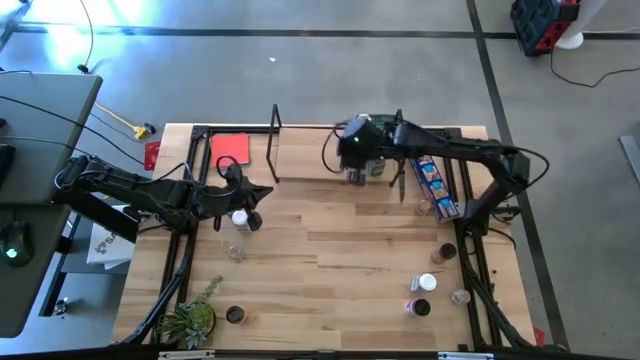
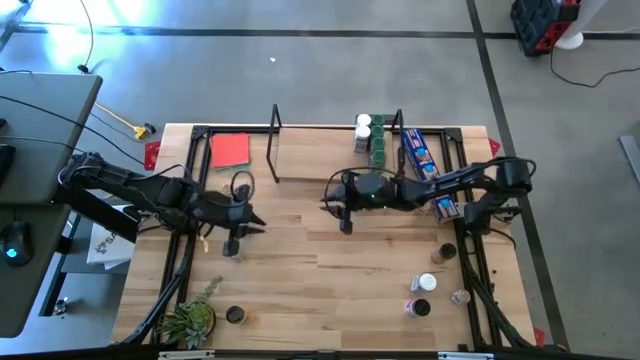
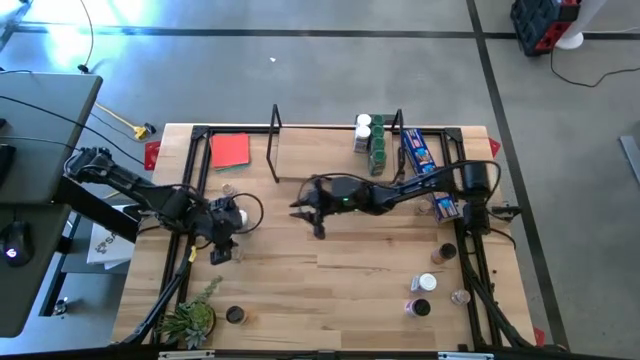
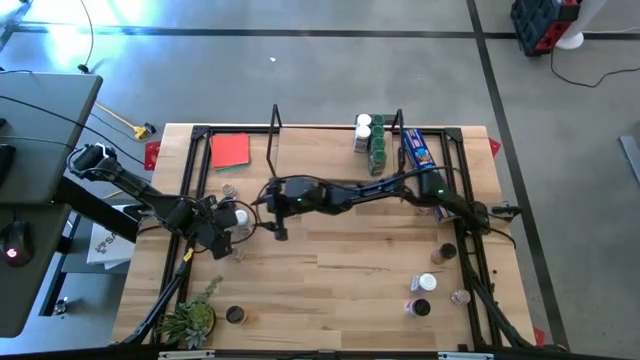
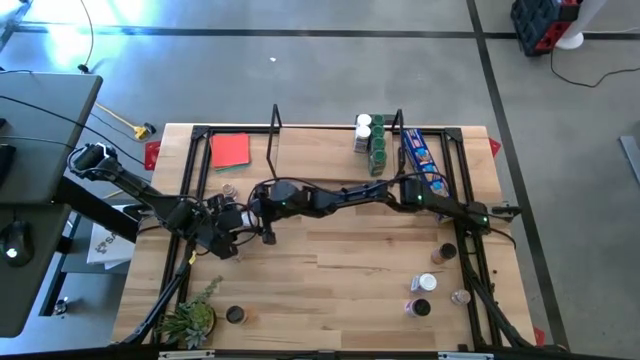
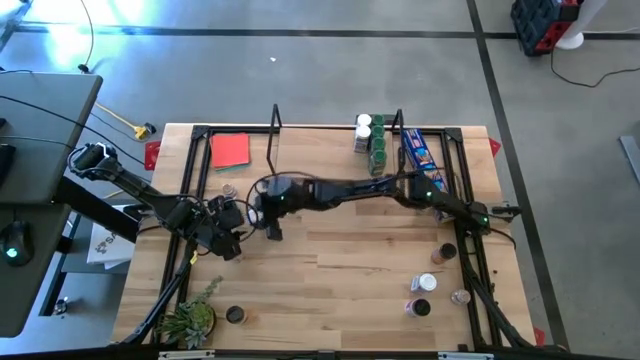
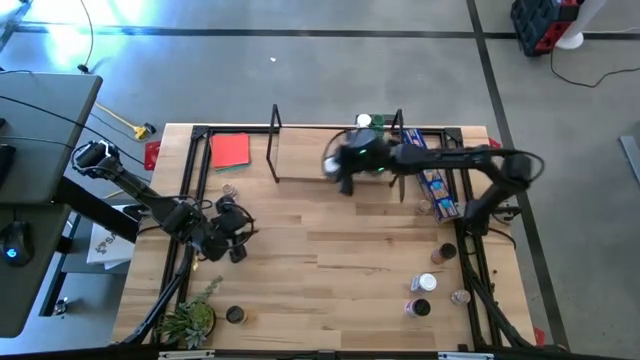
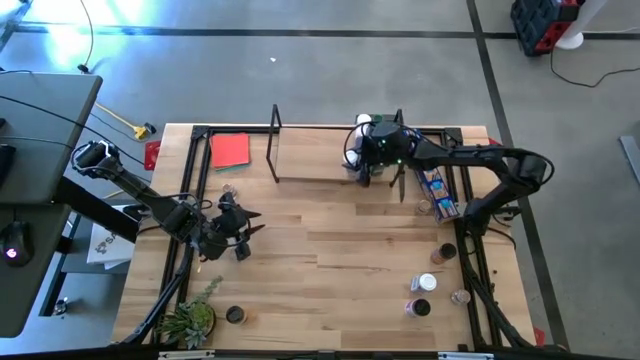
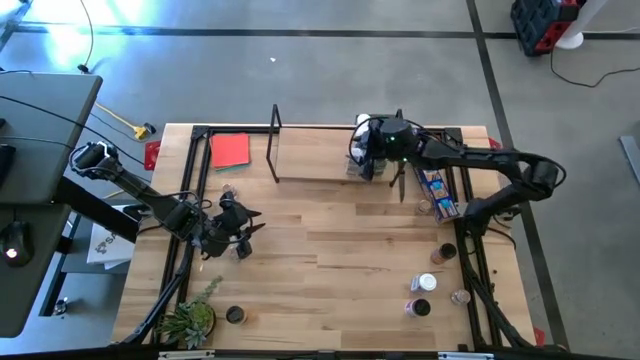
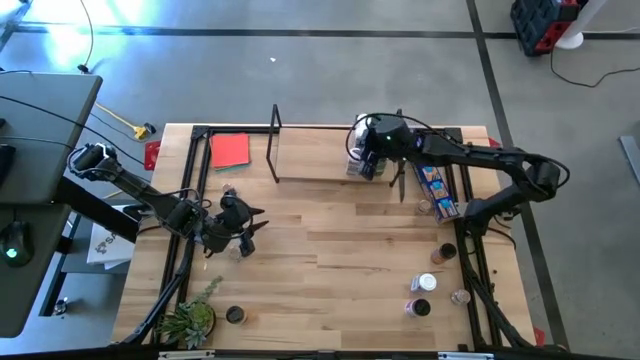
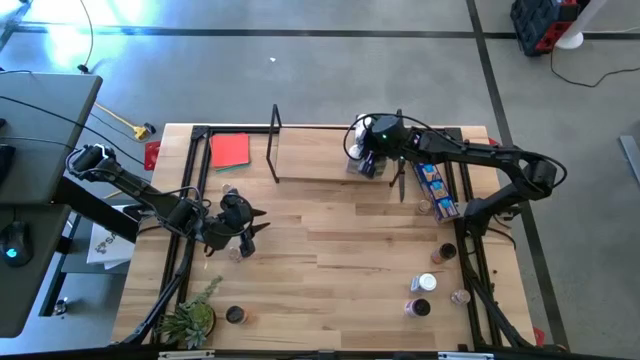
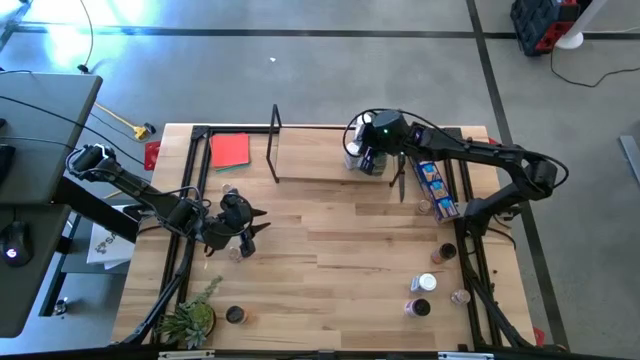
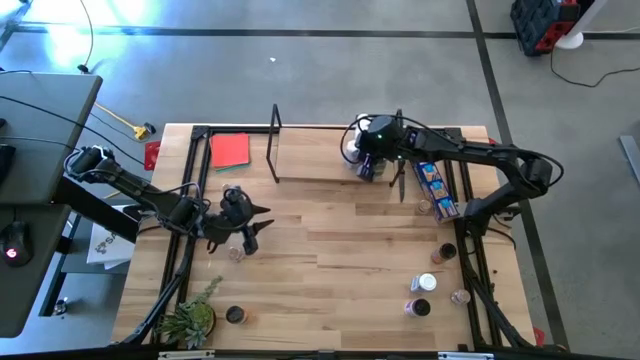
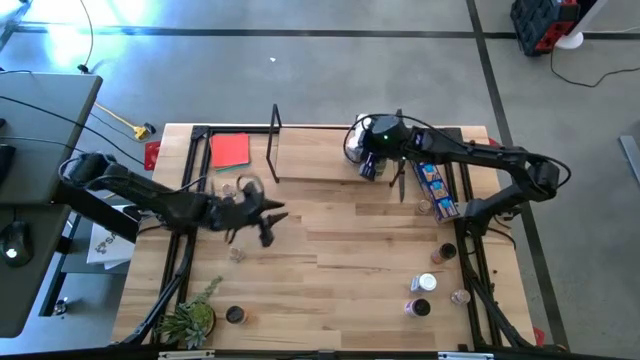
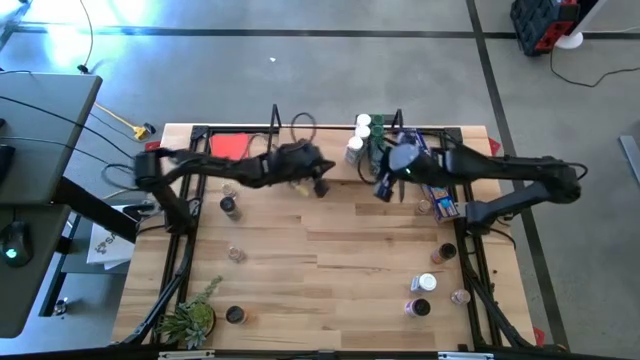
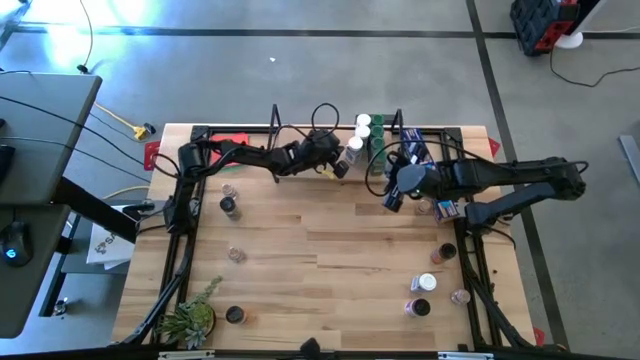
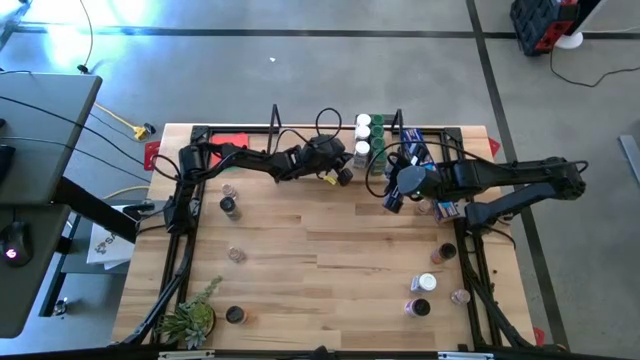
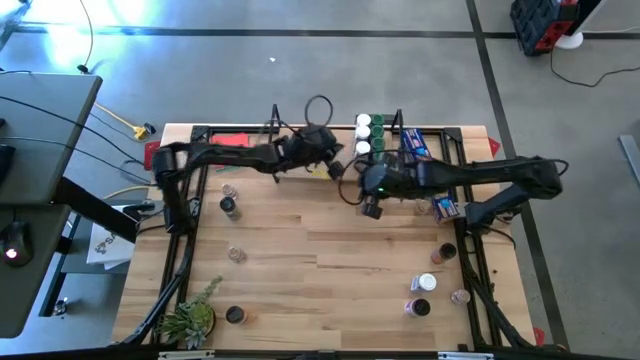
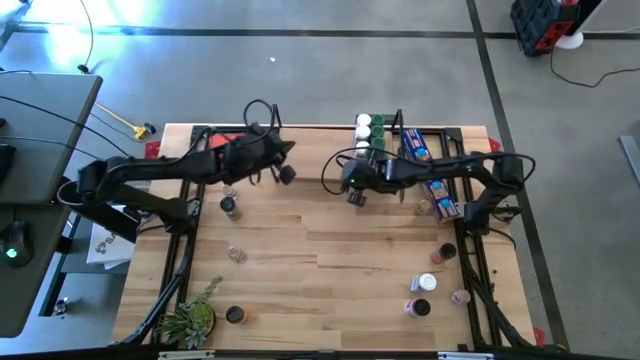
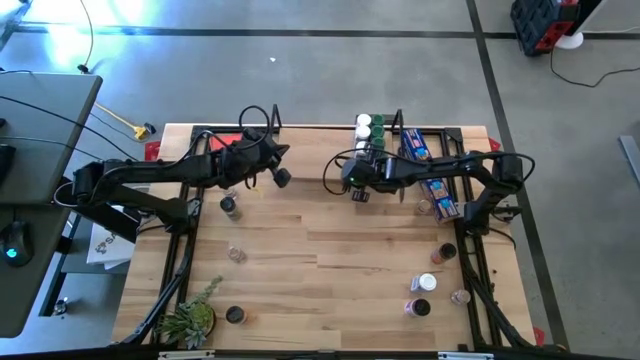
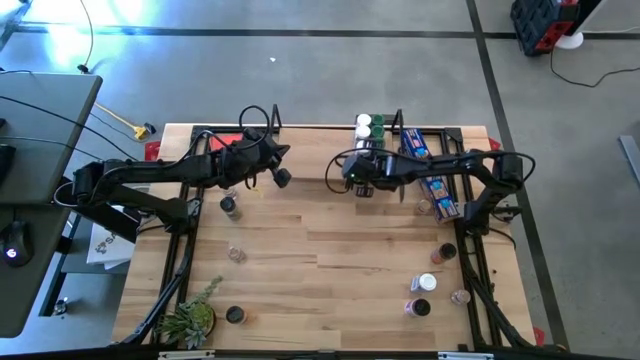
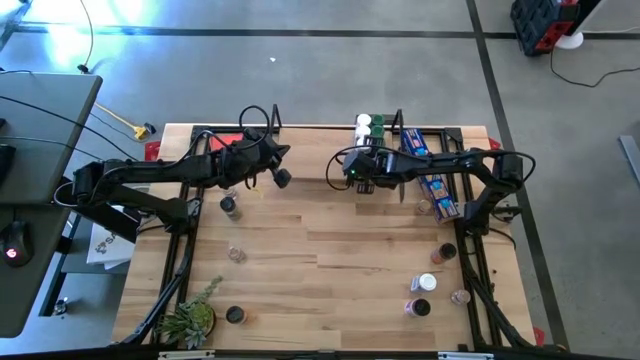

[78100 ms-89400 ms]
Task: Shelf spices
Put the left white seasoning bottle on the shelf aligned with other the white seasoning bottles

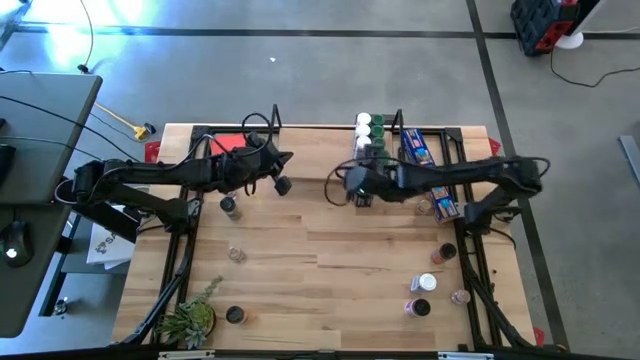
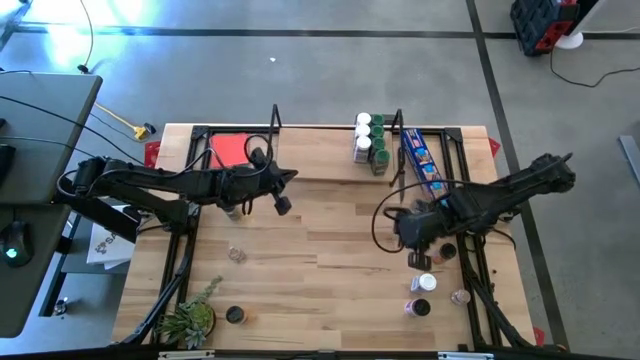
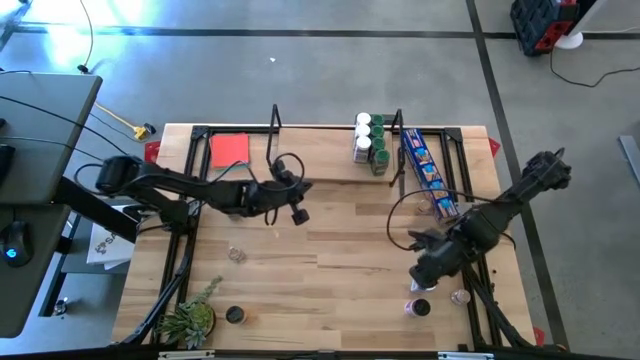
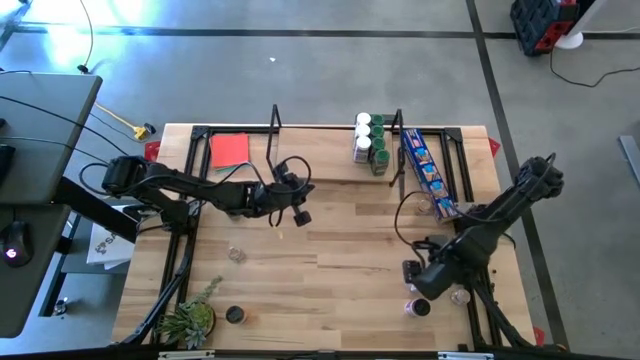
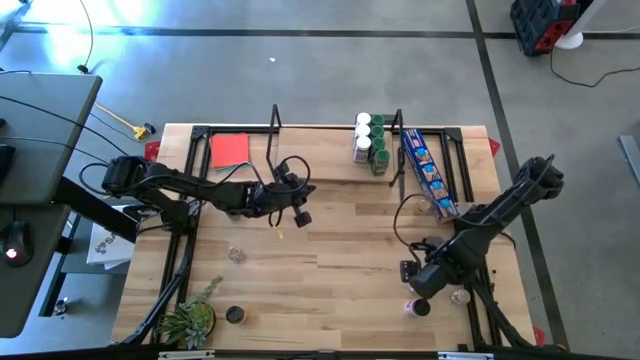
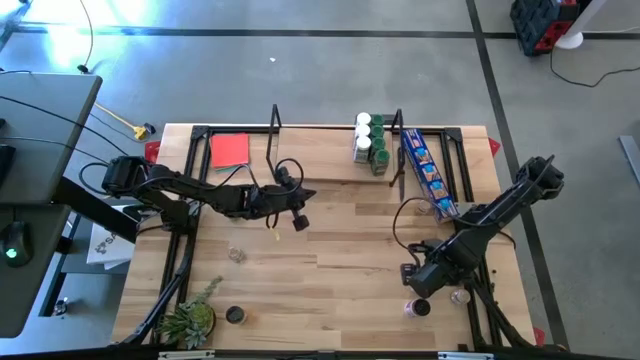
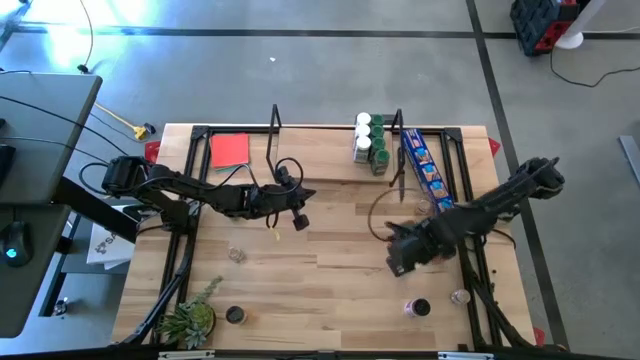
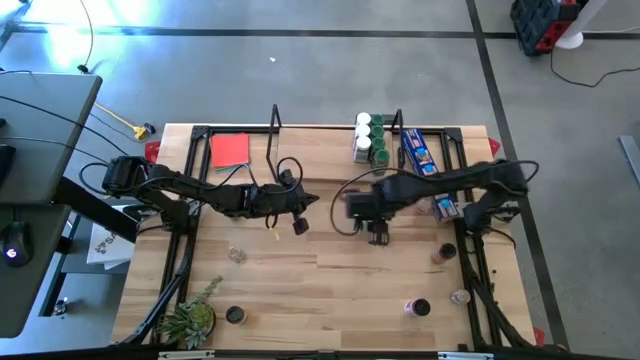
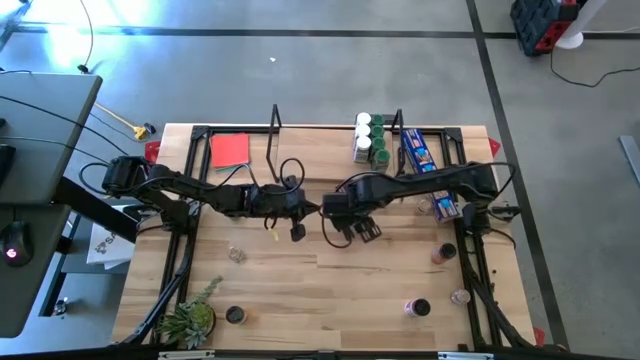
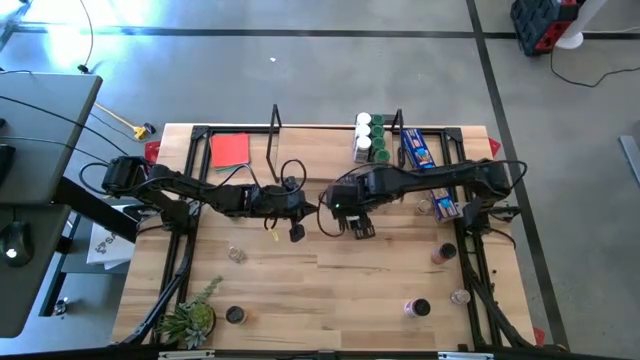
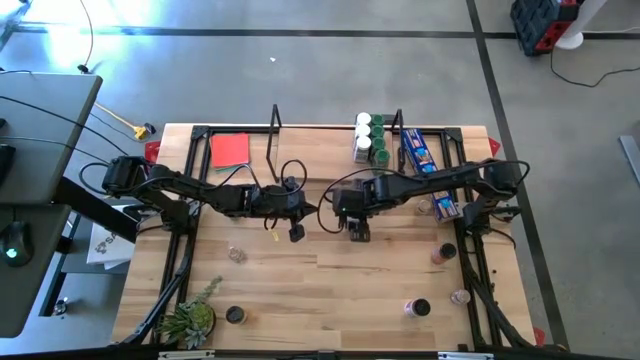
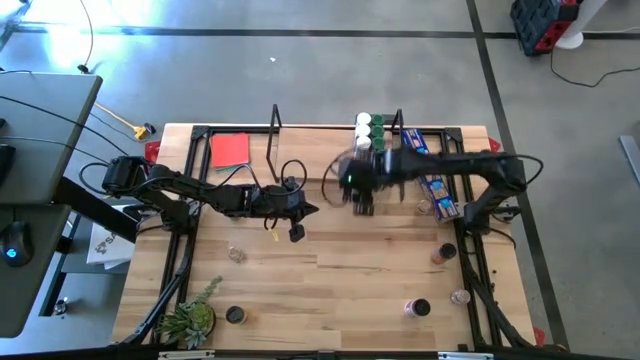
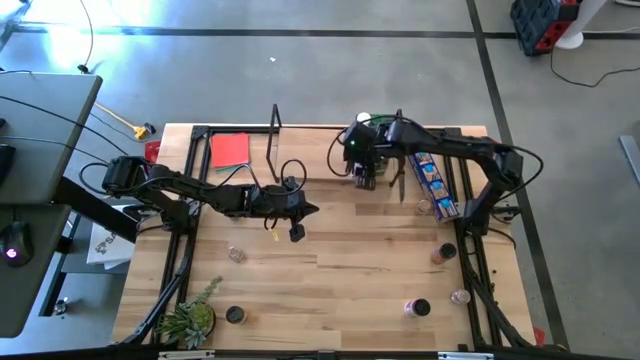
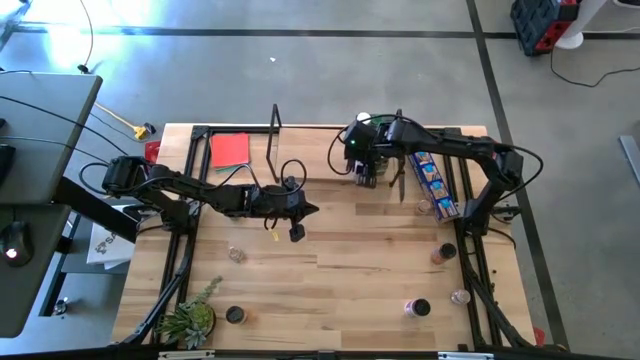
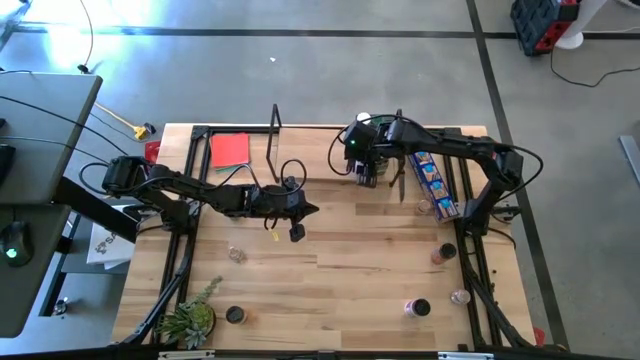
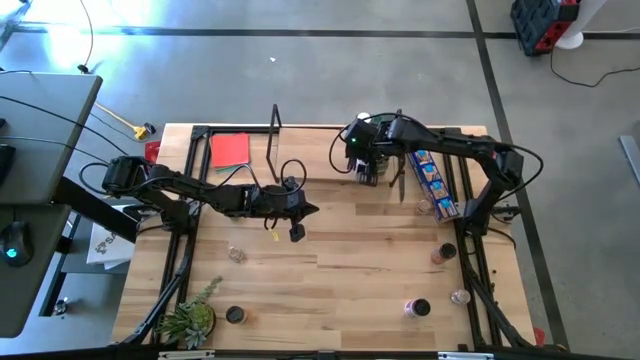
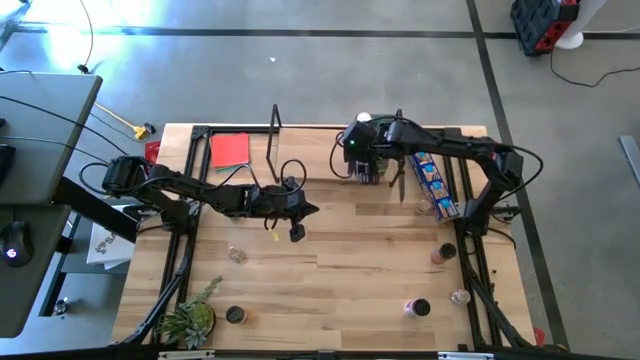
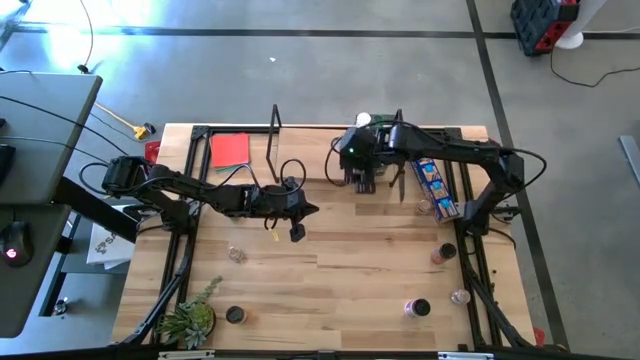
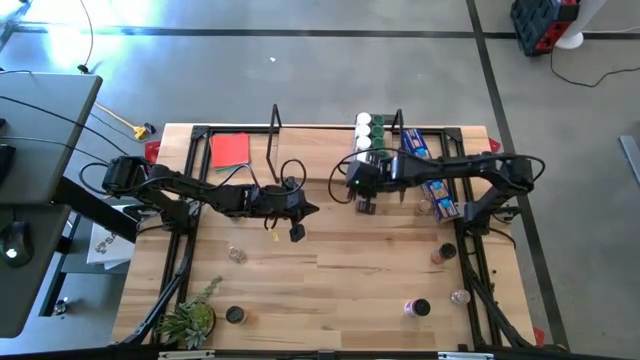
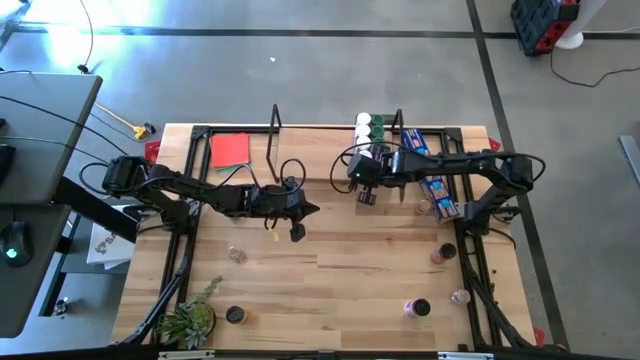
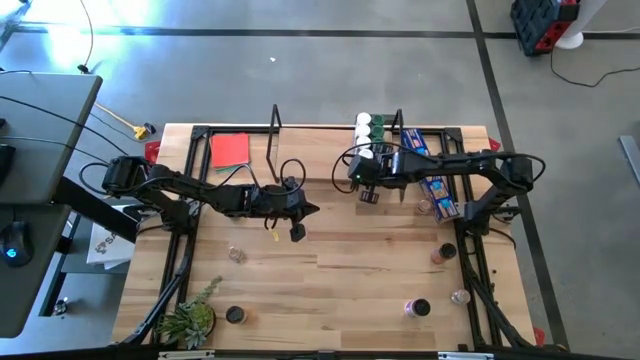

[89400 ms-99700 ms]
Put the white seasoning bottle on the shelf aligned with the other white seasoning bottles

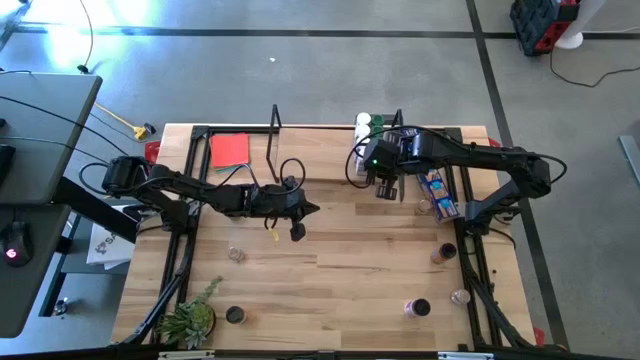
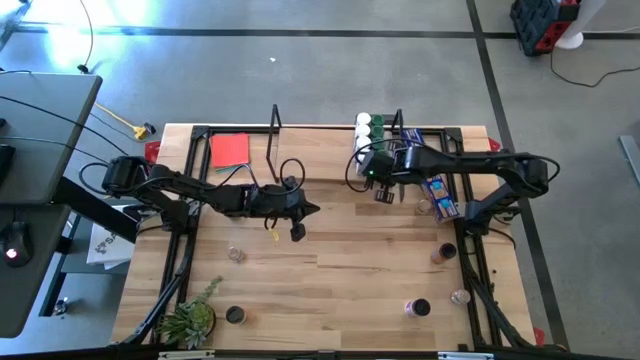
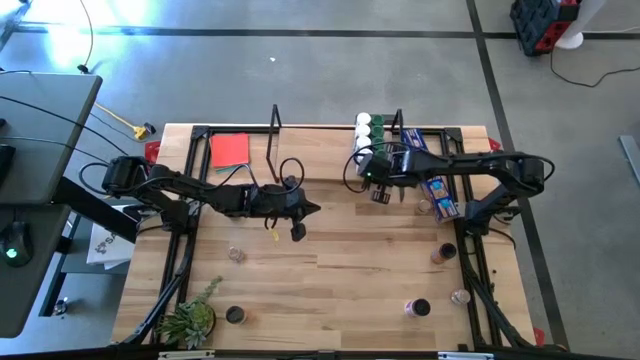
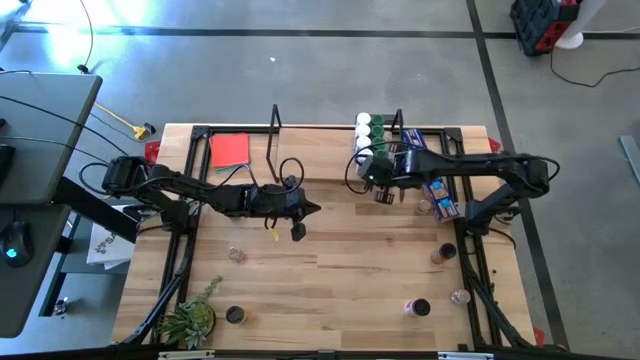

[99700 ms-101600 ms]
Adjust the green seasoning bottle on the shelf
